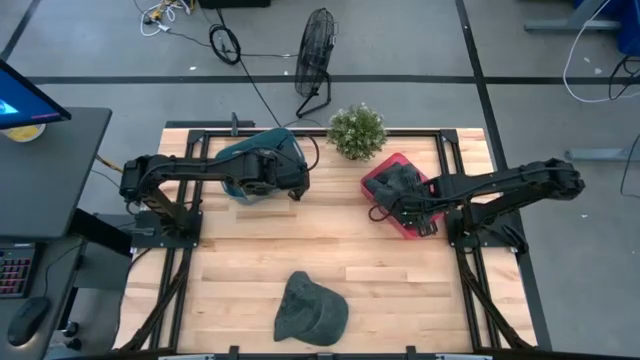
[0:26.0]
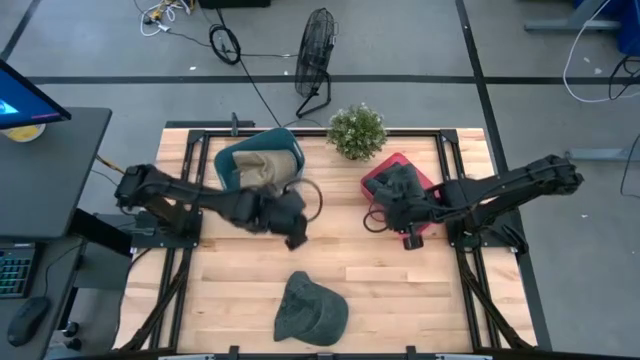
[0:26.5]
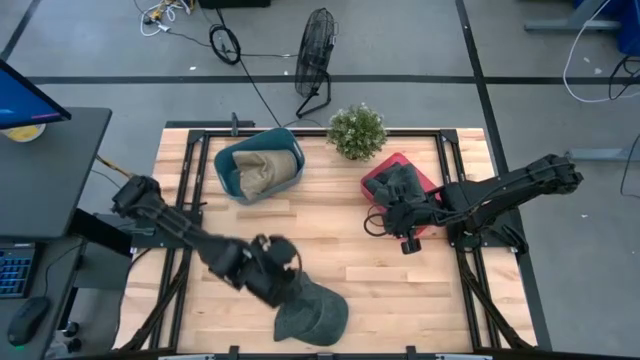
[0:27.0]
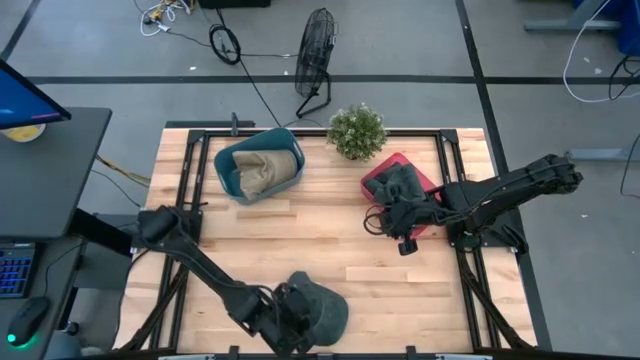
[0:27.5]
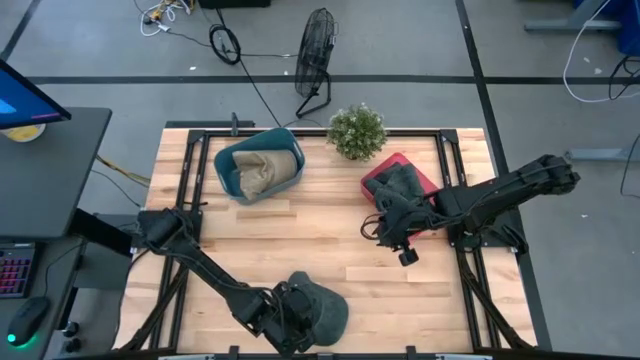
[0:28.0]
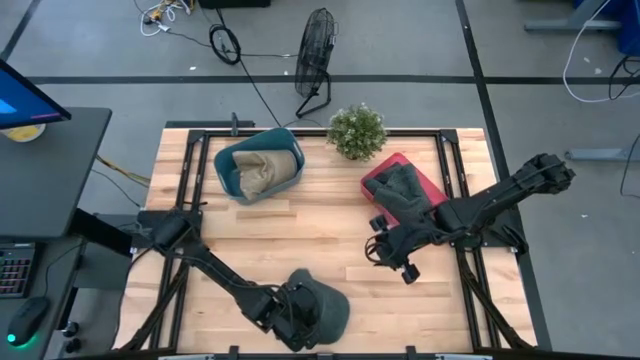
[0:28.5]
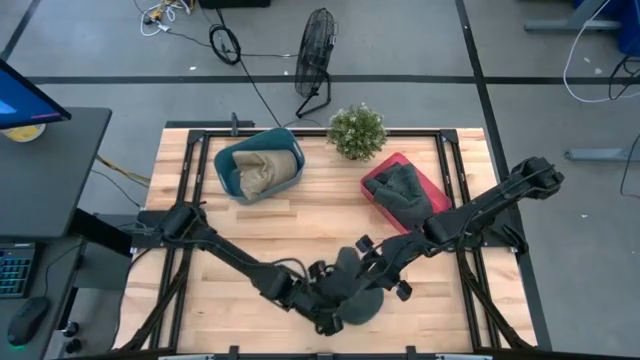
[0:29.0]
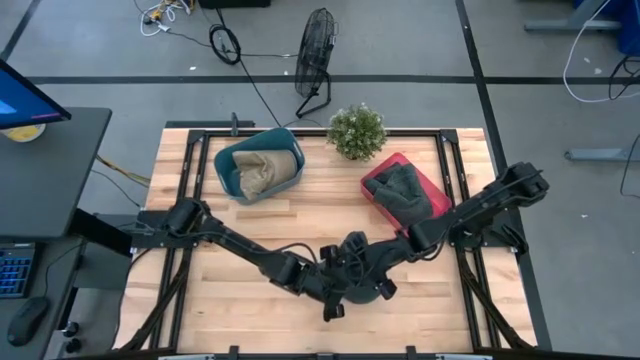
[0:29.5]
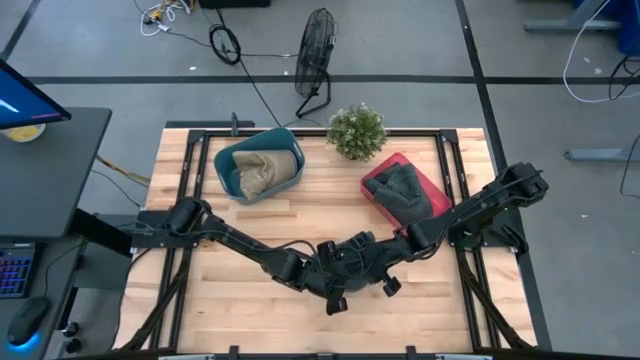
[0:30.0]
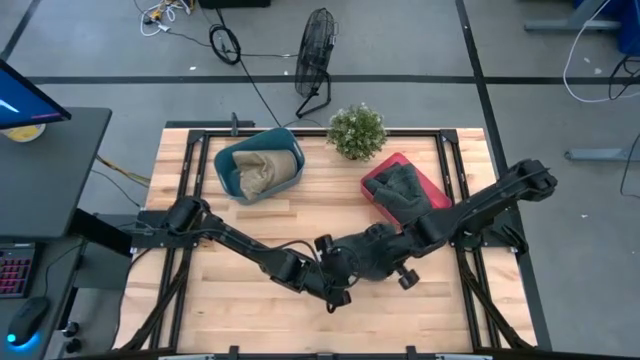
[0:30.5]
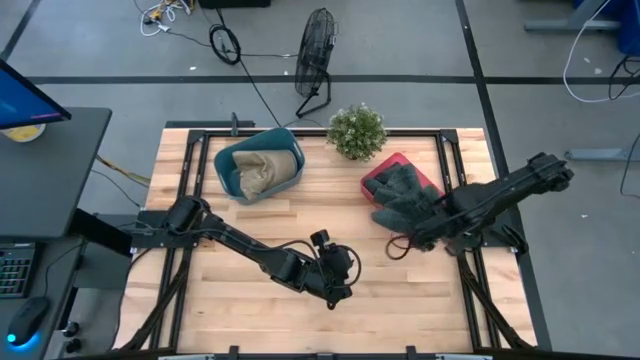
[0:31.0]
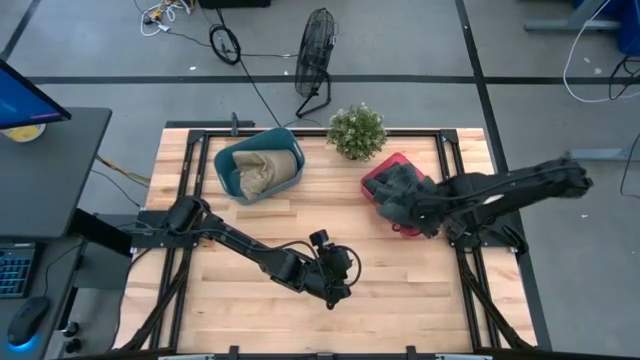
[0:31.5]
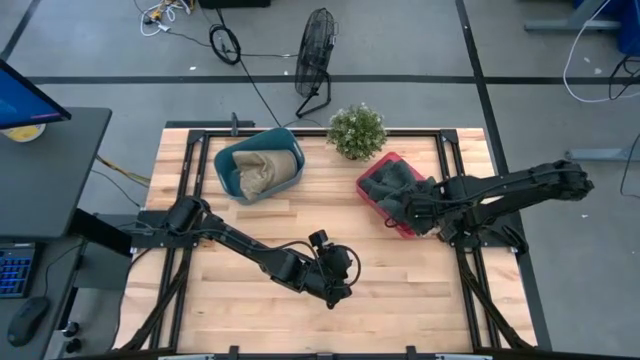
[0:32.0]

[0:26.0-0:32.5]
Task: Pick & Place hat
Put the black cap into the red bin

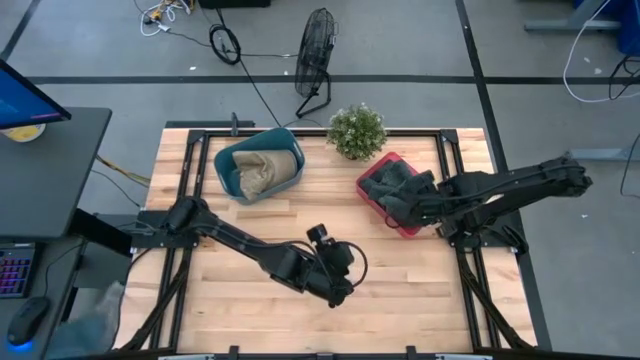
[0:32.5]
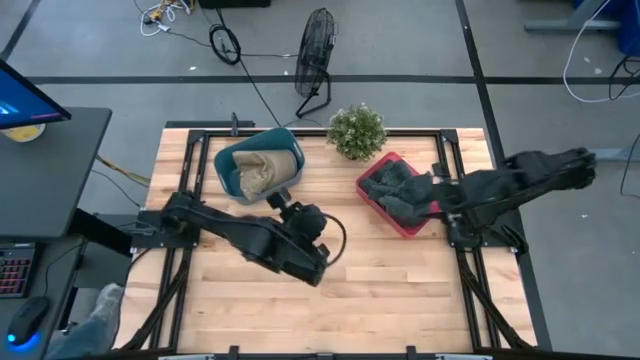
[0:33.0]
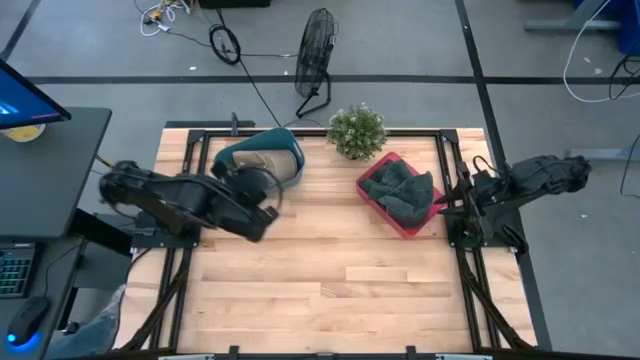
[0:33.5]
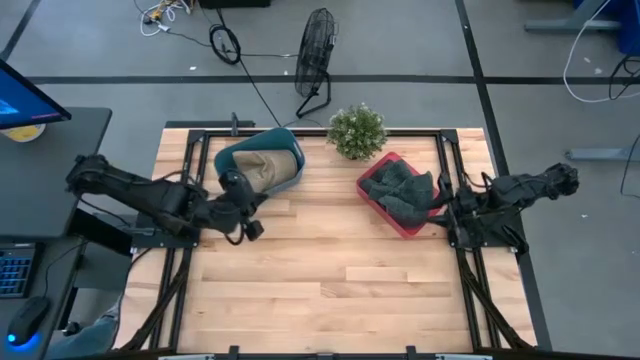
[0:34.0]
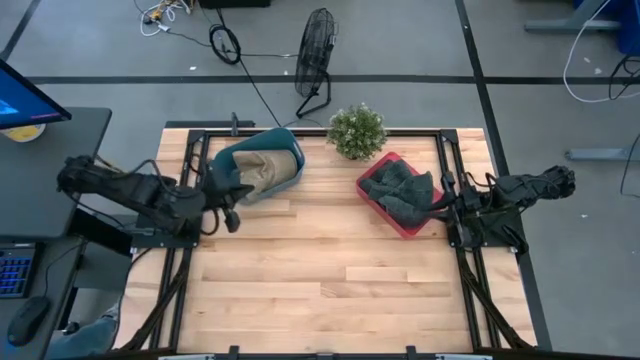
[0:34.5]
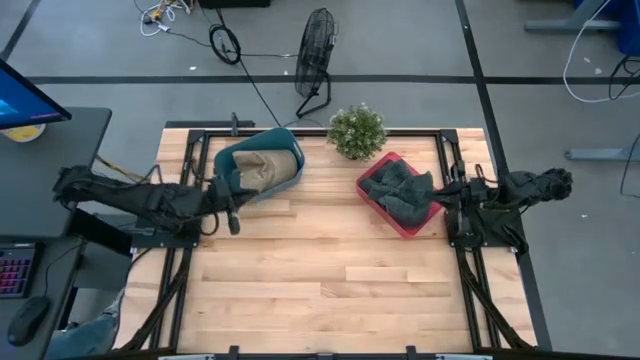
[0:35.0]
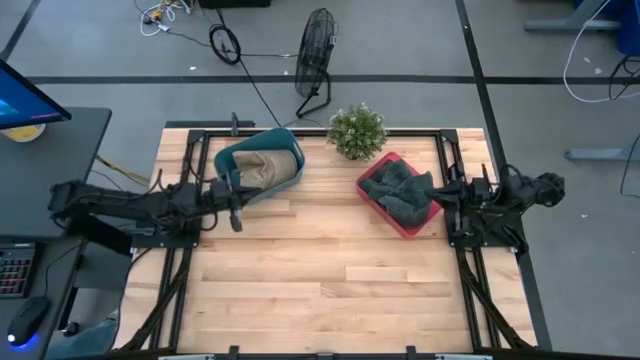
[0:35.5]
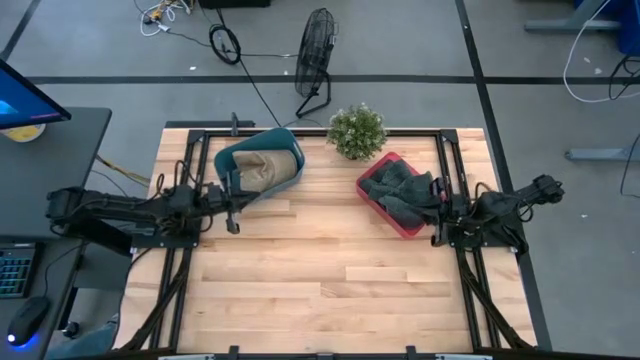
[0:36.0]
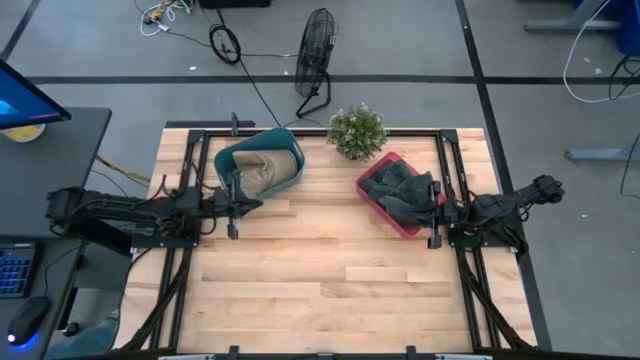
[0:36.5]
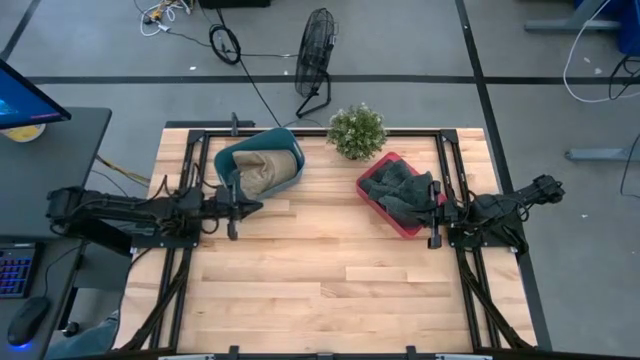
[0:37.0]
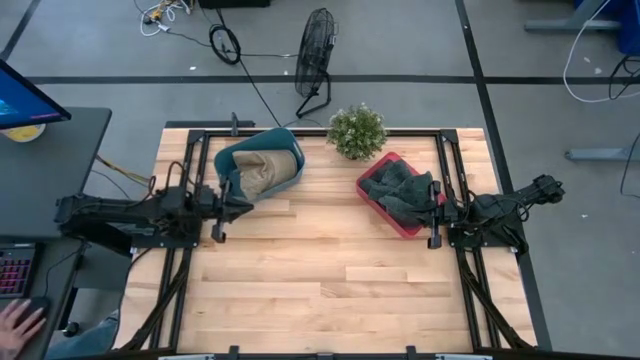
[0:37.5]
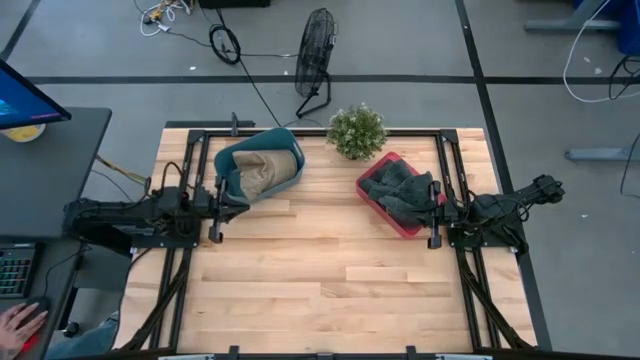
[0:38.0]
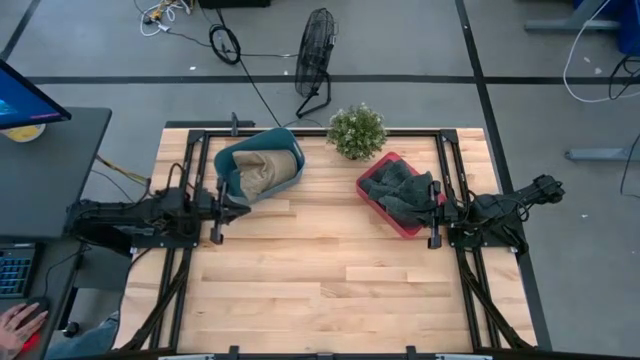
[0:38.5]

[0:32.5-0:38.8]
Return to home position

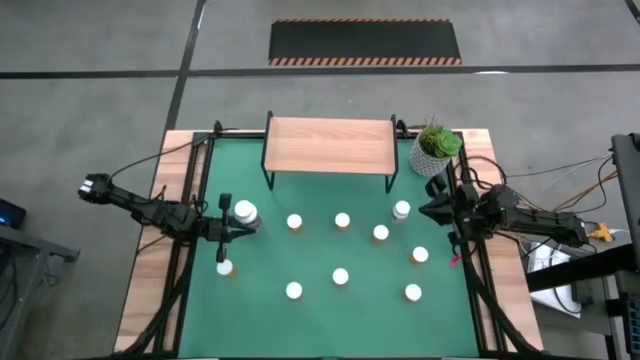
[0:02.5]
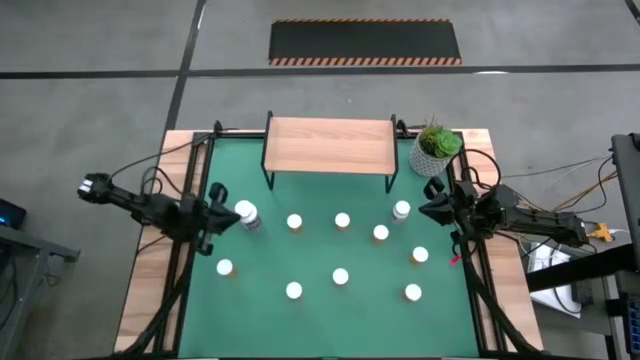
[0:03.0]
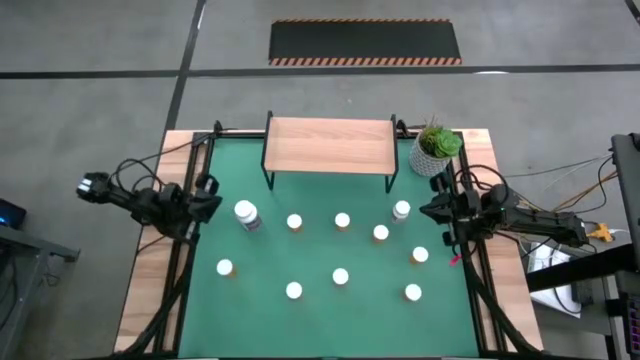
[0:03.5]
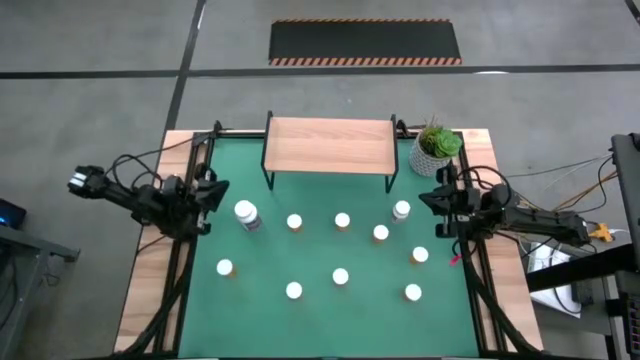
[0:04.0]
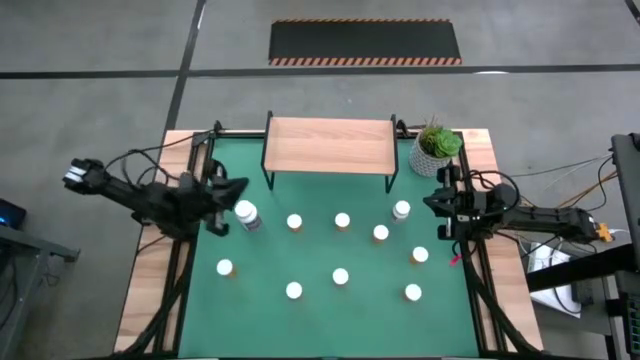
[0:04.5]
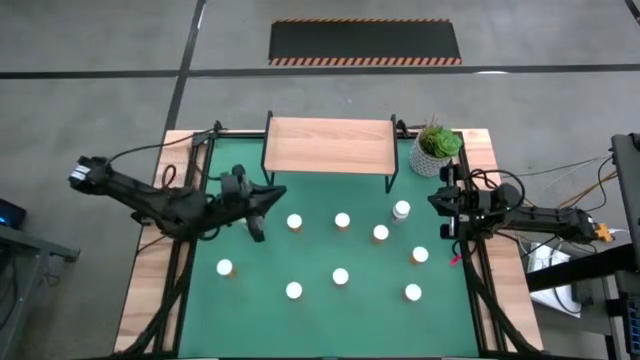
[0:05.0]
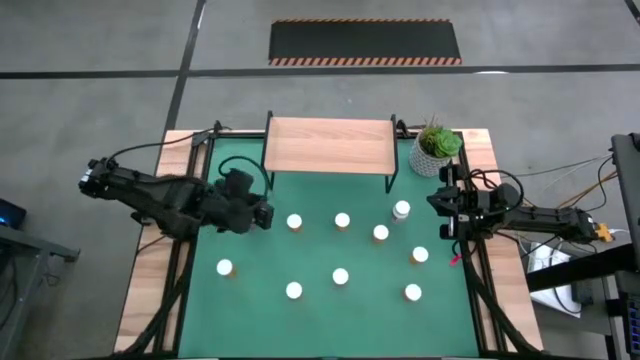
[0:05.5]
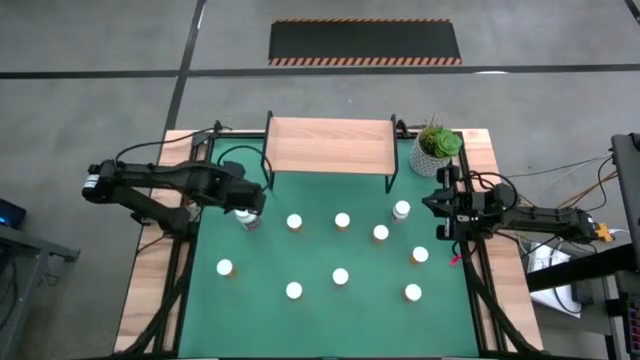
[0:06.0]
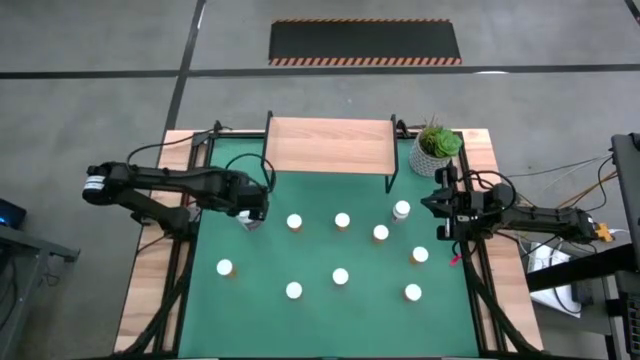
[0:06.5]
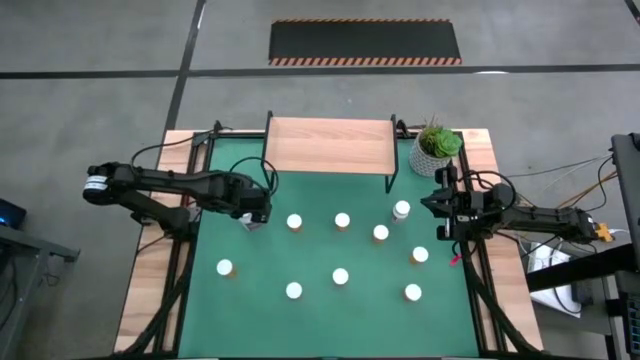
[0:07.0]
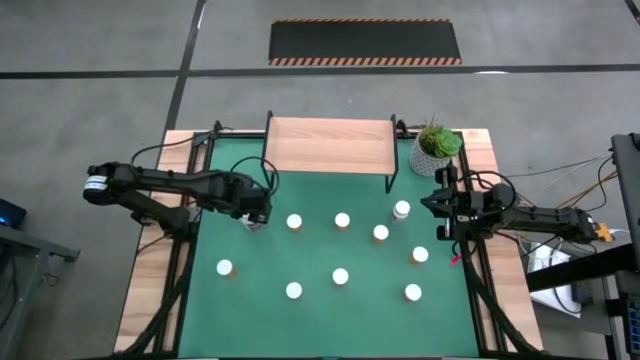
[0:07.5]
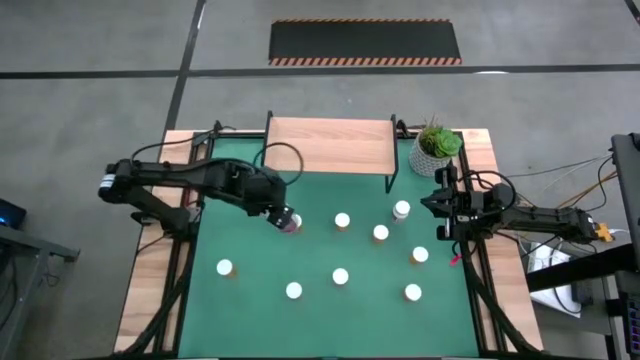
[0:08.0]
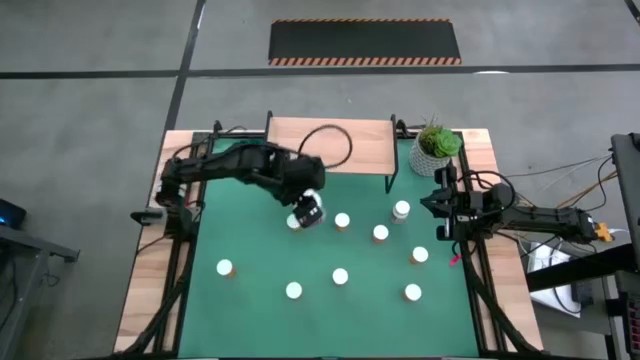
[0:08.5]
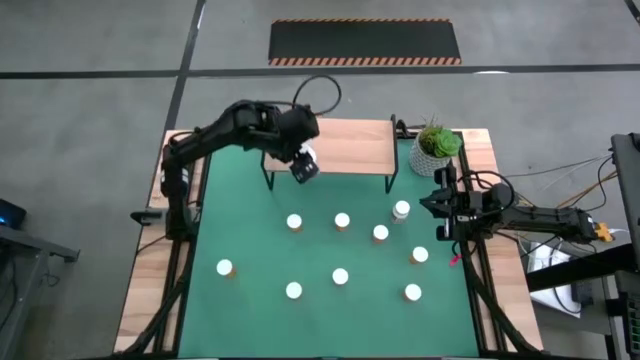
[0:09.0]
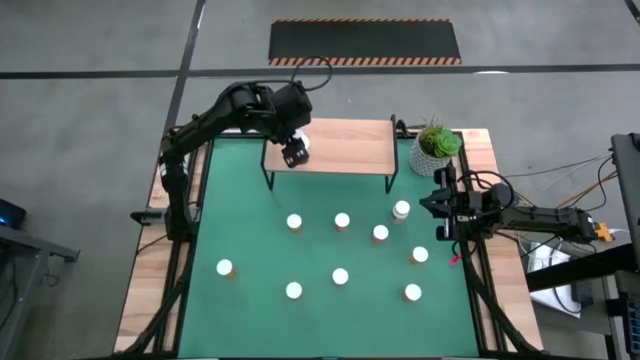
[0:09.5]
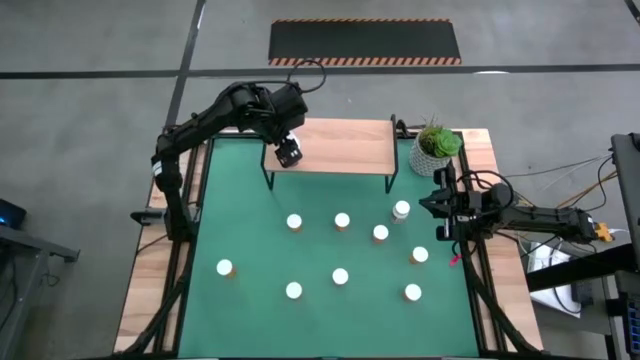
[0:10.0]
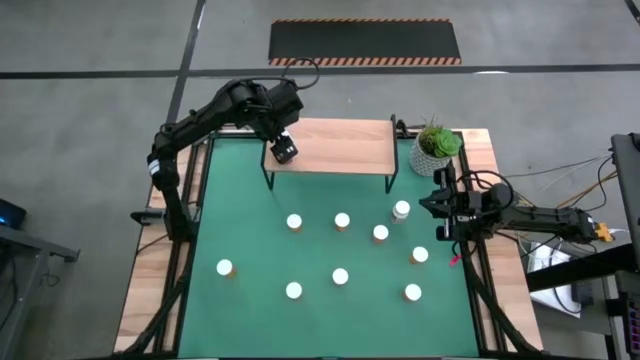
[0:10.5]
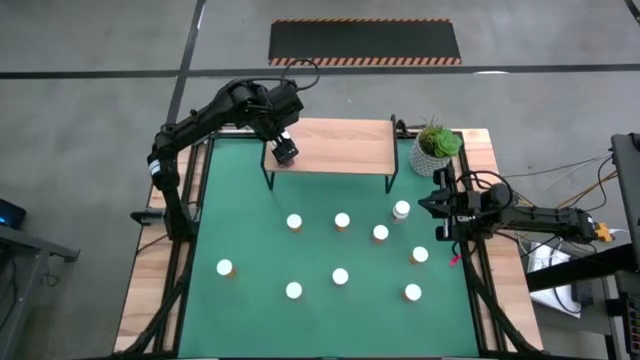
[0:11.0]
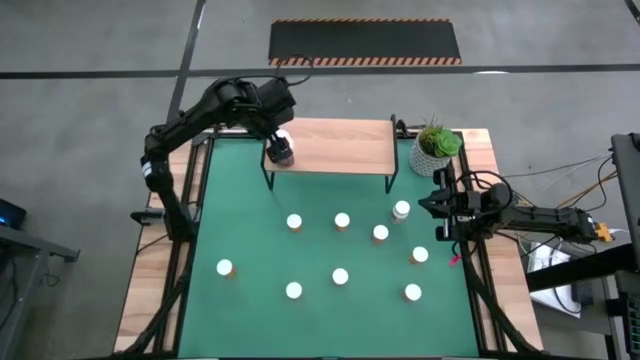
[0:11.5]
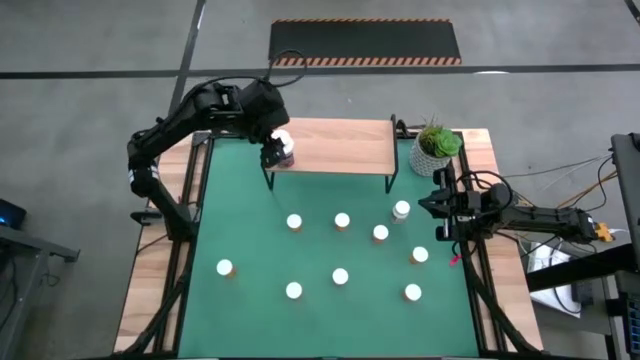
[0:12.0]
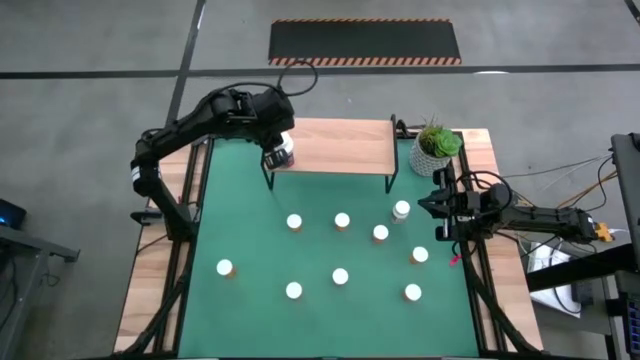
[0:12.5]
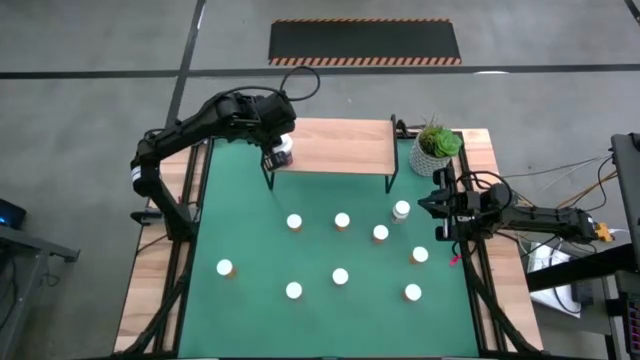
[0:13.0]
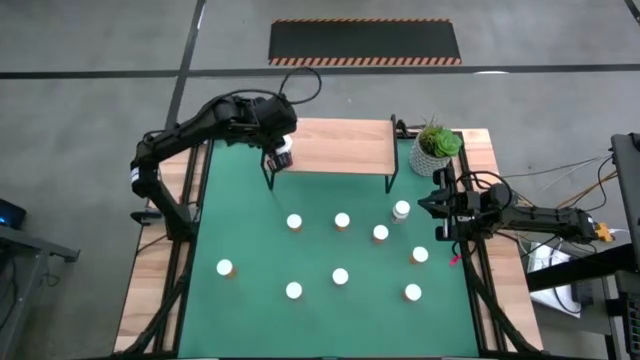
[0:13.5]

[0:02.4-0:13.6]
Task: Pick and place medicine bottles onto shelf by color
Put the white medicine bottle on the shelf
